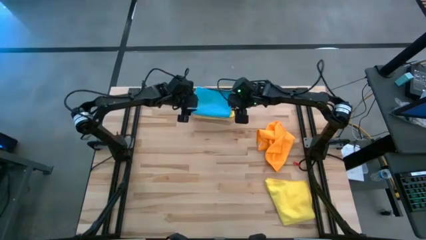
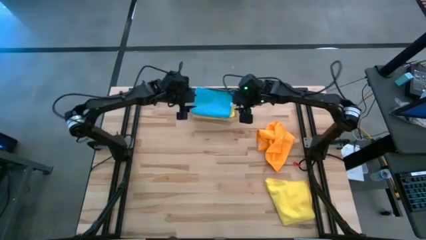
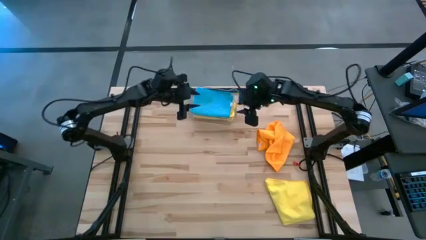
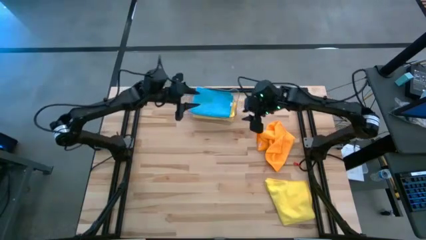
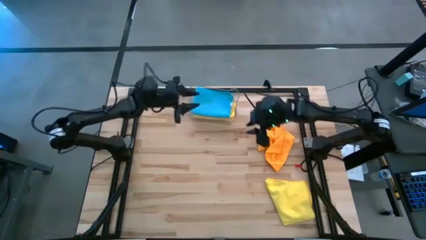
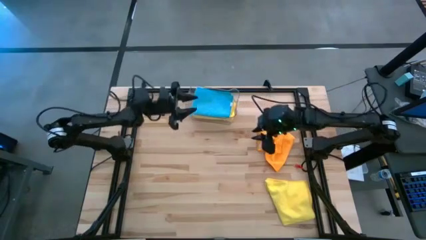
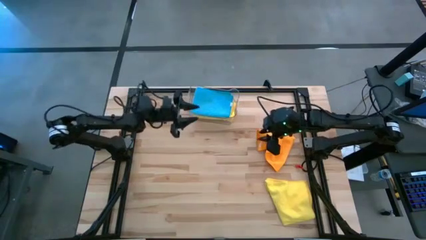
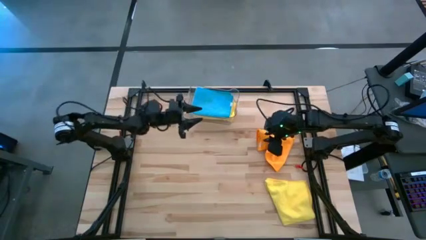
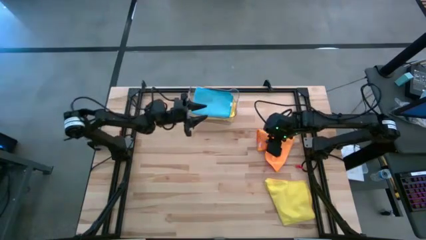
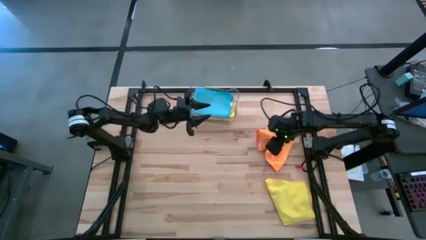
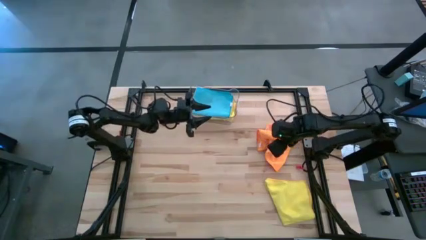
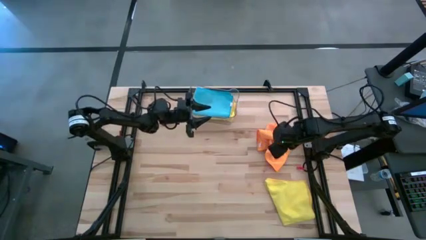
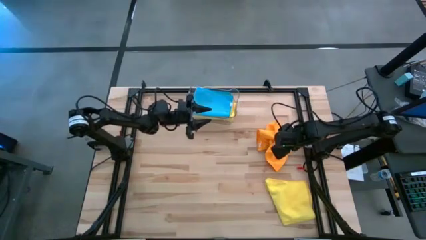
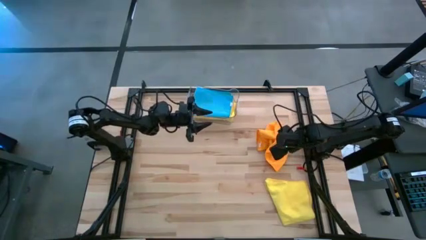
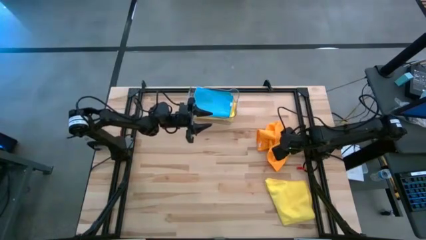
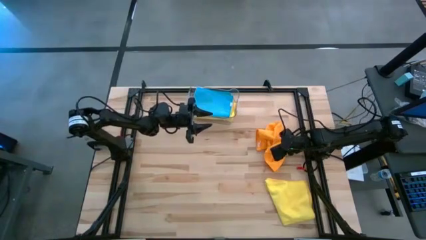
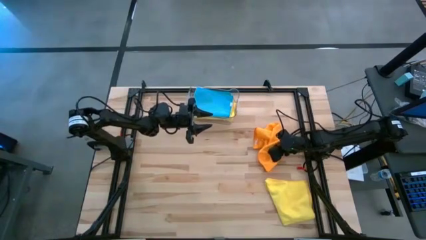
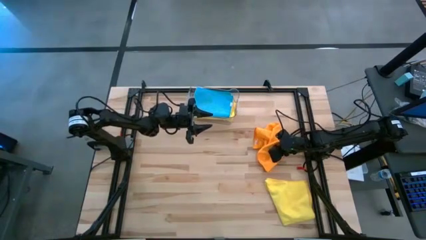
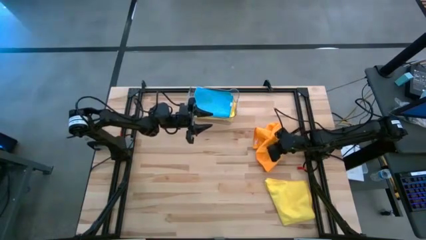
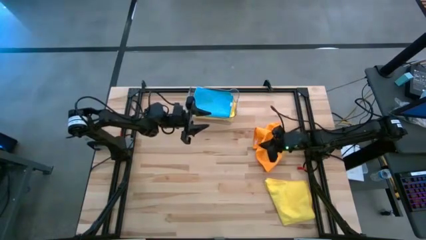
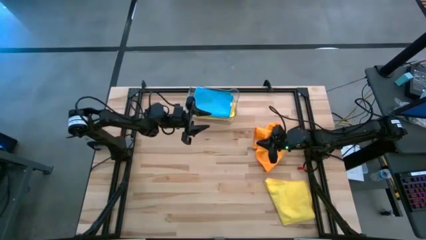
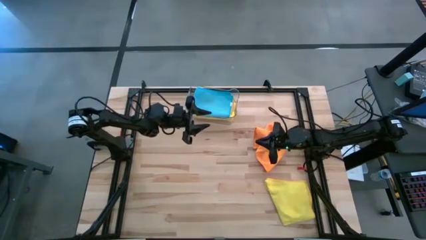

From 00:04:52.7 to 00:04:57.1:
Task: Fold microfiber towels
Fold the orange microfiber cloth

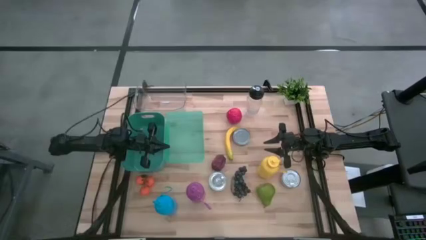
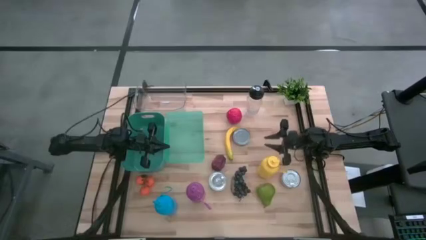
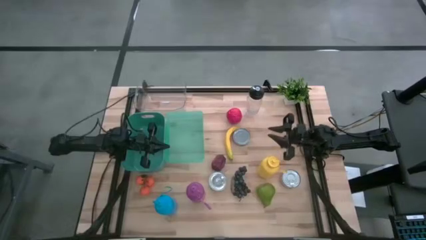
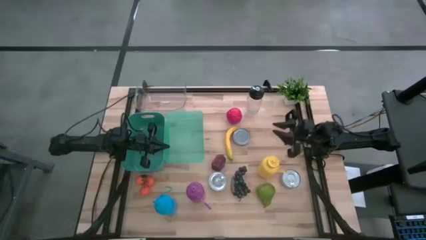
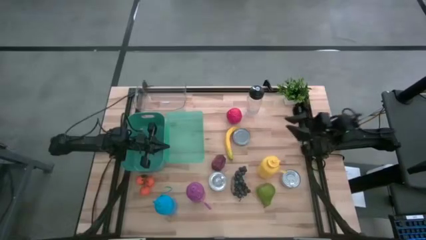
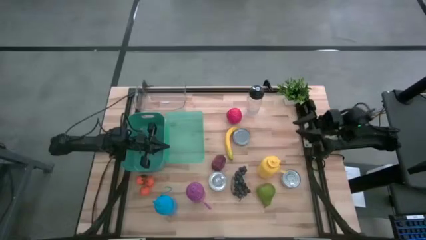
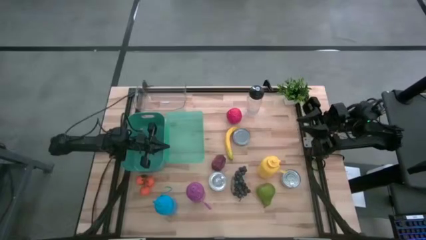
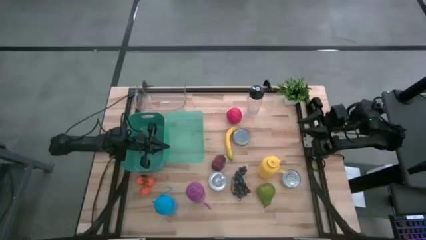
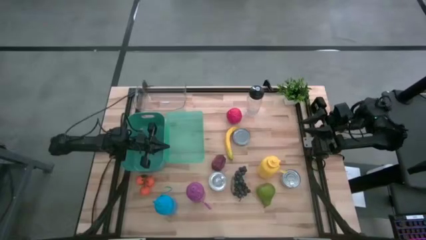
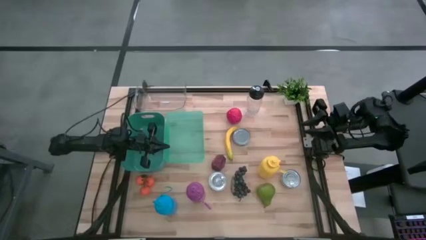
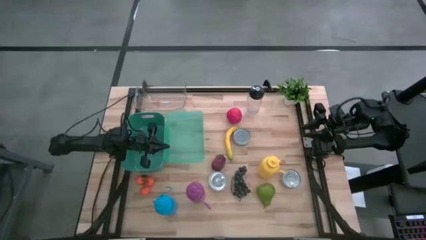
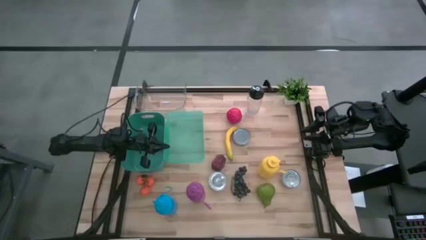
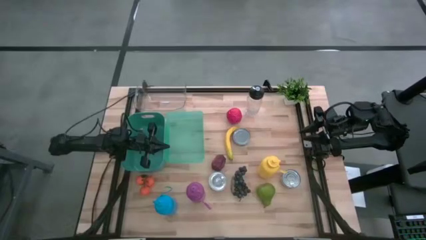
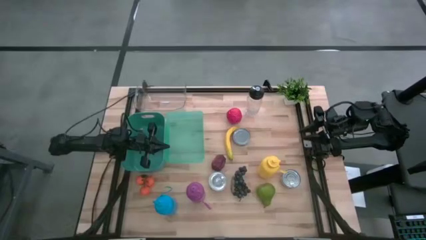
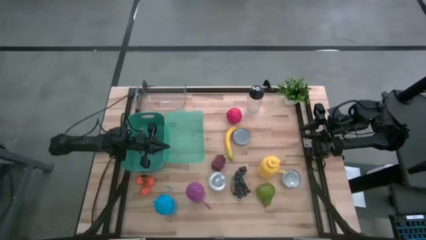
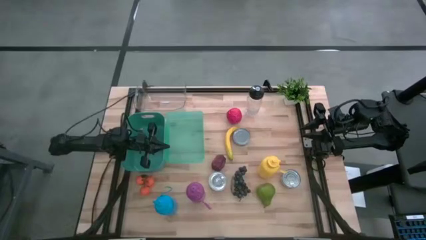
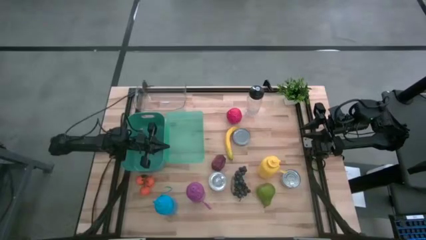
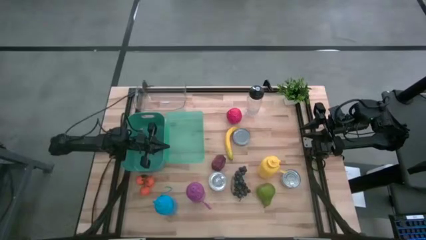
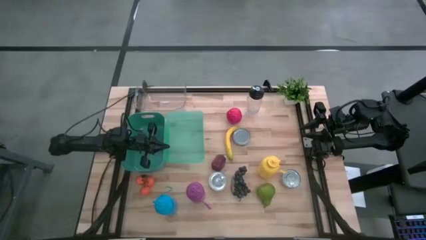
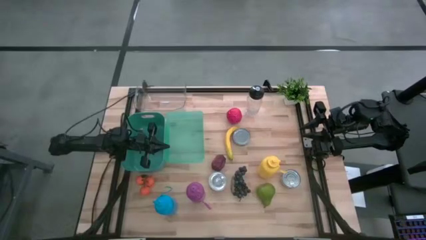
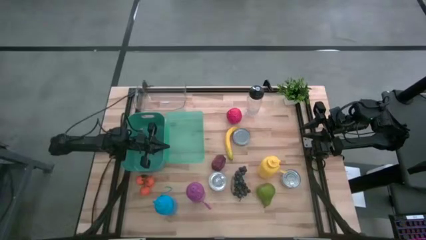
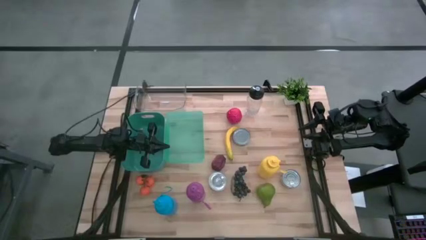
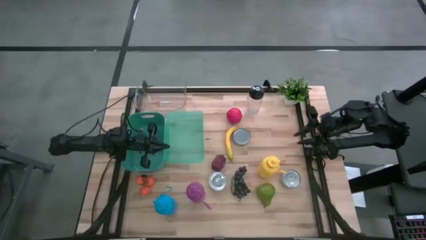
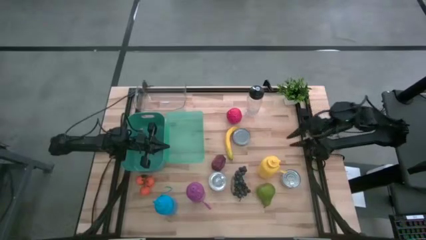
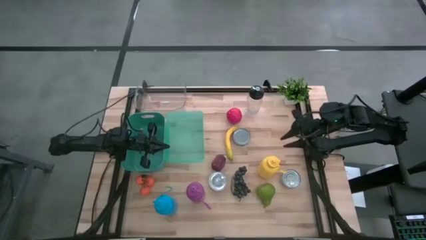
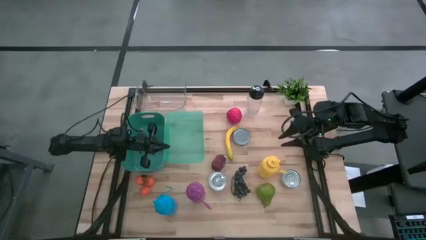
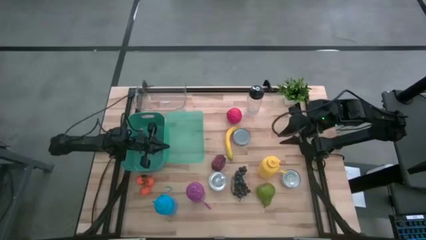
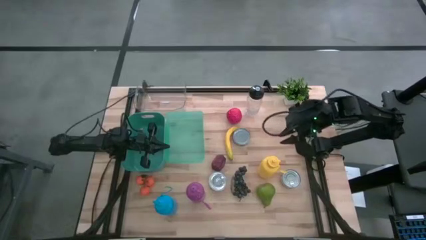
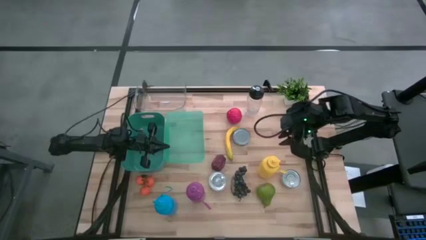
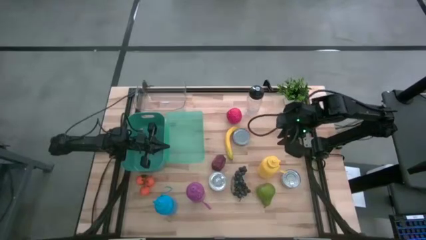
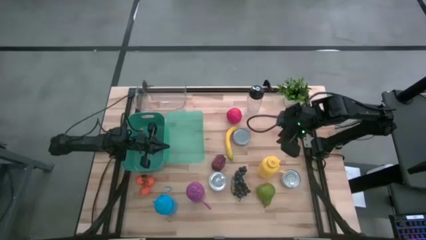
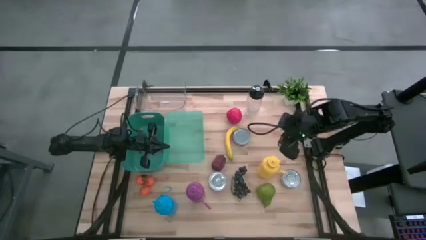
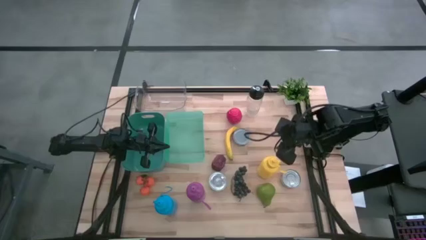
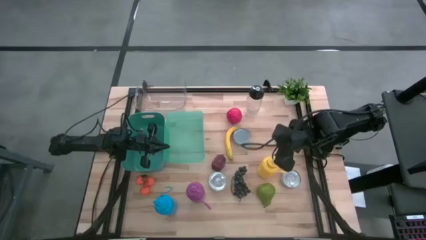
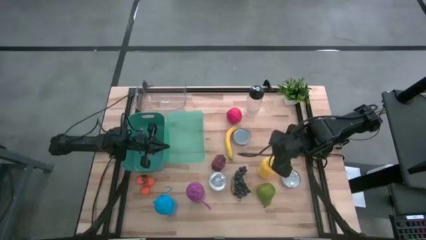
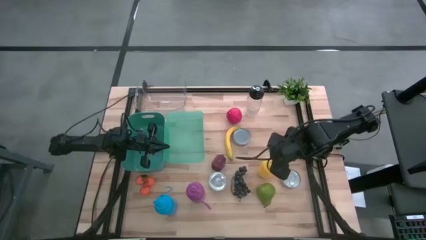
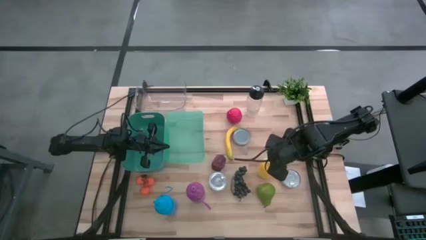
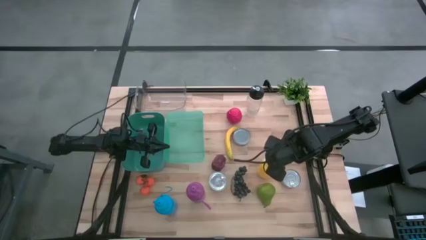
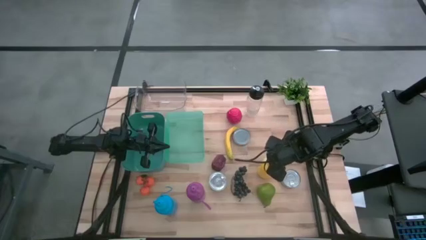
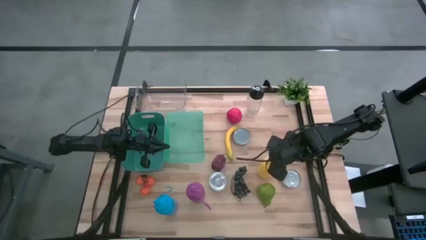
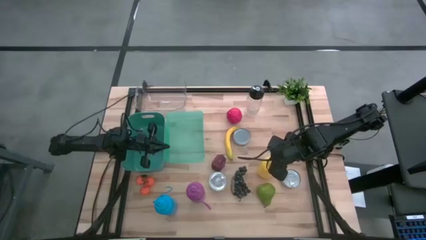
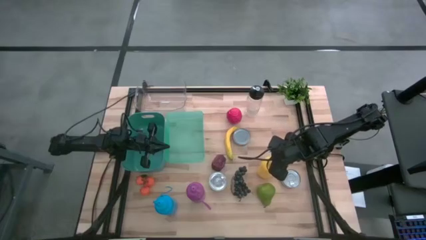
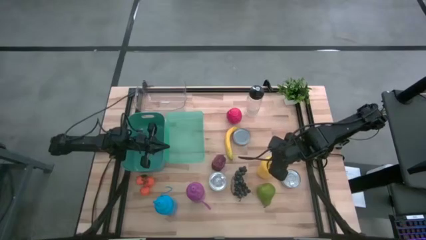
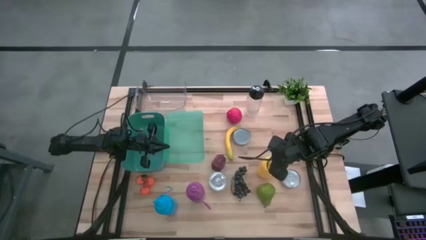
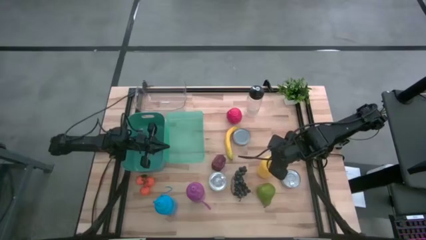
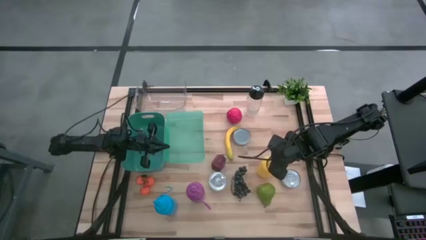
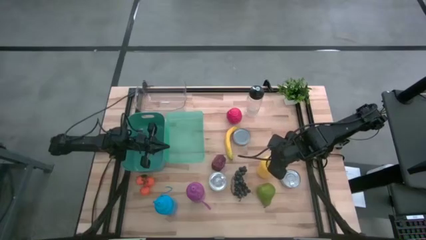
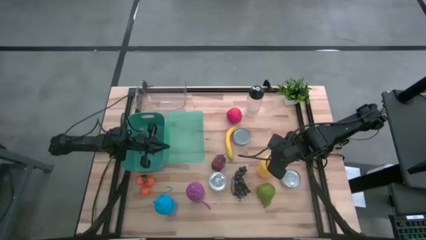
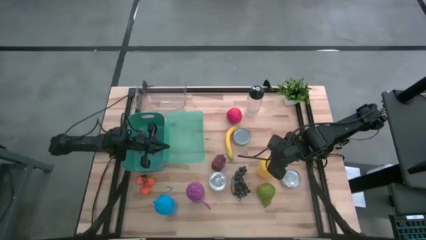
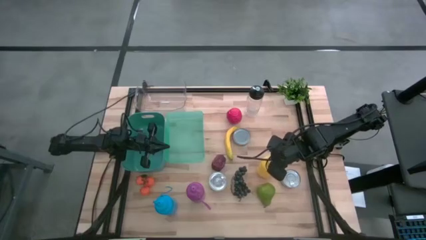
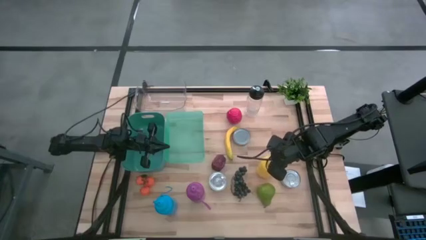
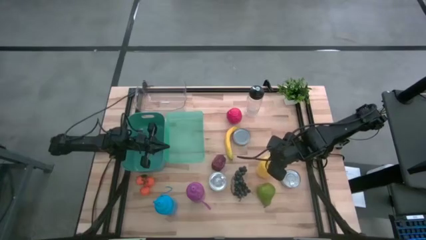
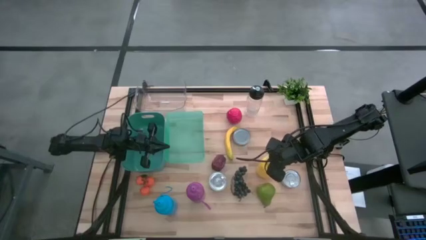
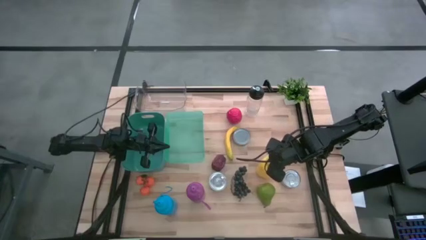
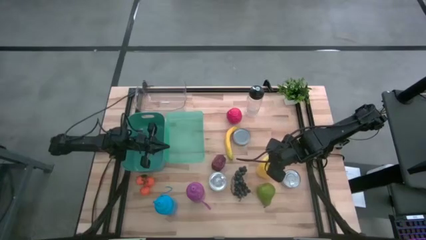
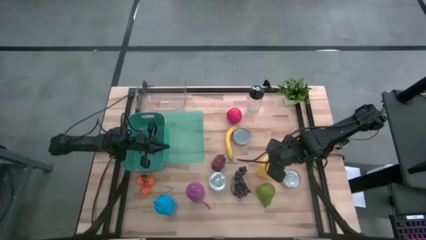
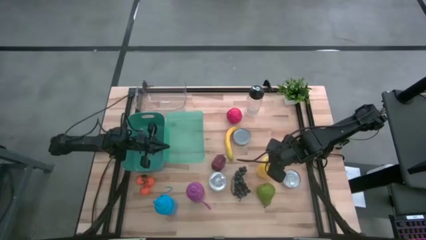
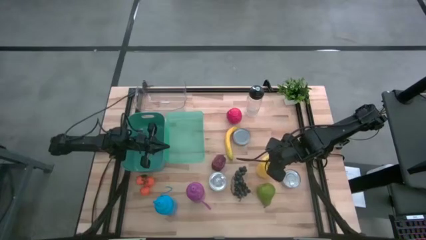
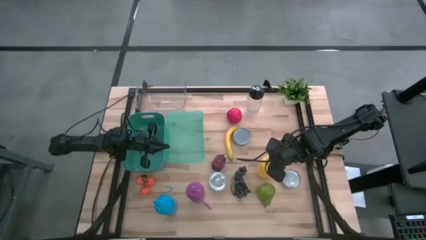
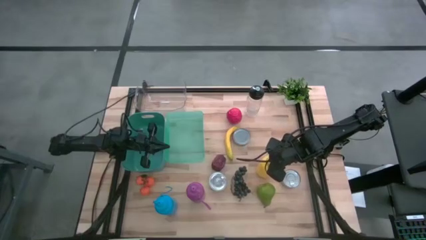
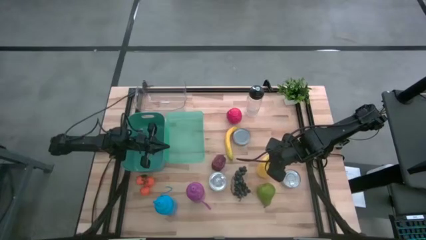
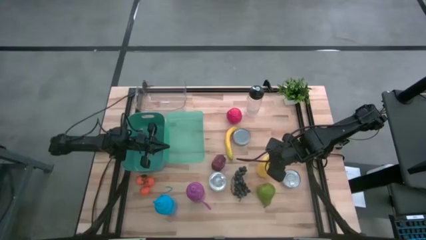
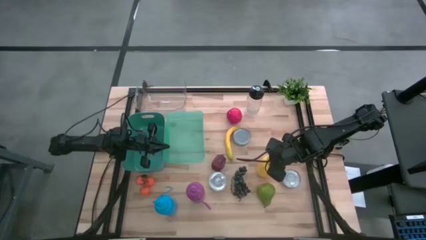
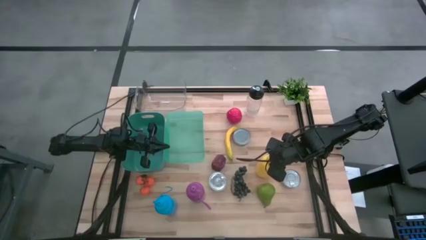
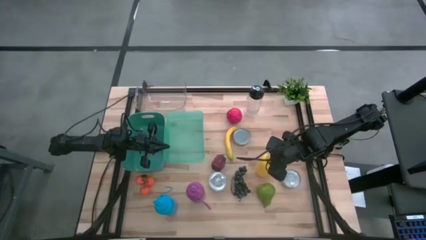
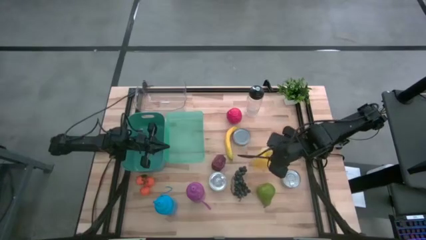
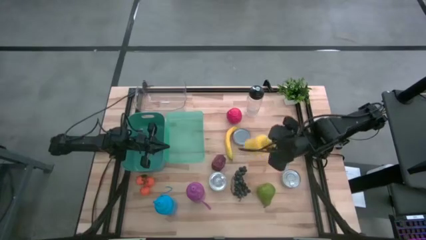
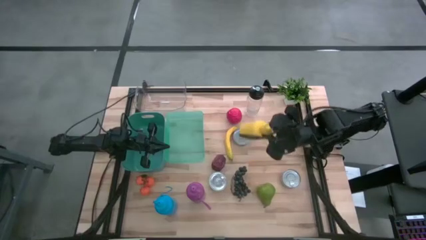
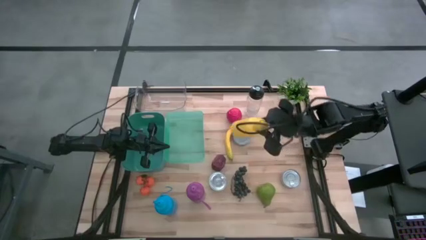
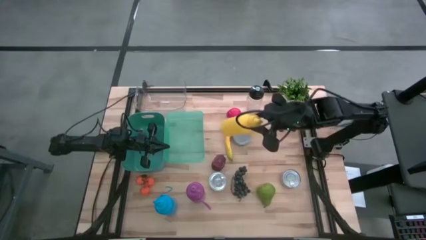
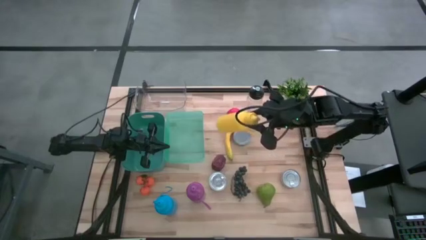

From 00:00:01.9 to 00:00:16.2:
Task: Pick & Place Food Item
Put the yellow water bottle into the transparent bin
